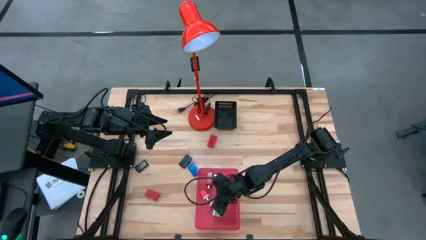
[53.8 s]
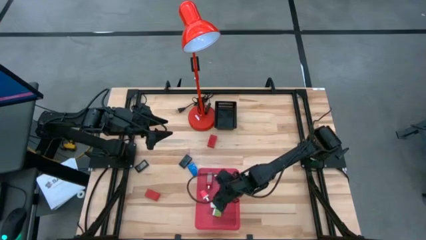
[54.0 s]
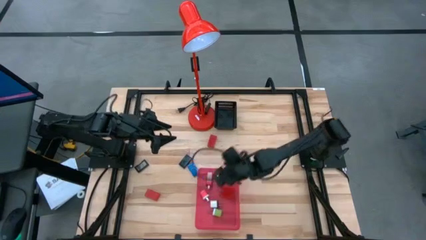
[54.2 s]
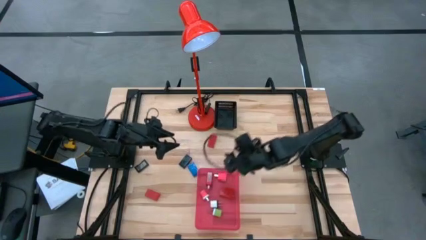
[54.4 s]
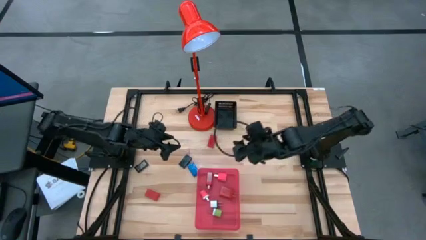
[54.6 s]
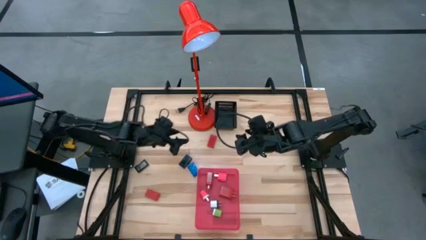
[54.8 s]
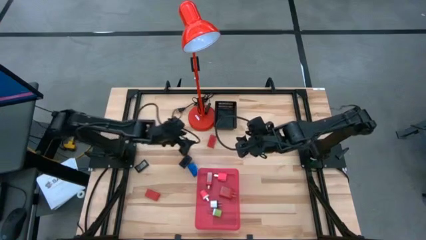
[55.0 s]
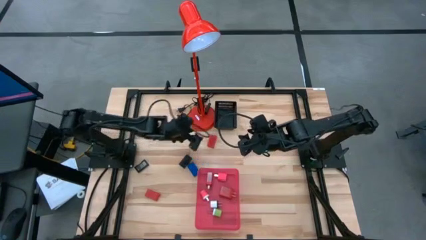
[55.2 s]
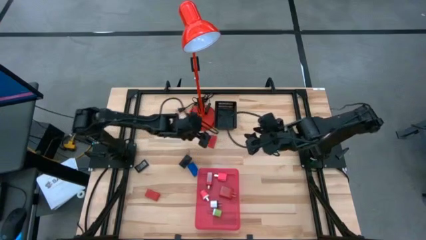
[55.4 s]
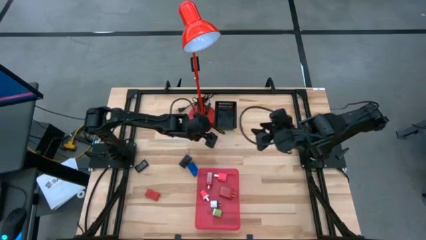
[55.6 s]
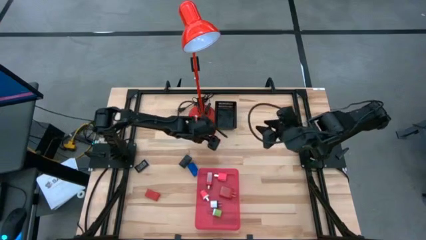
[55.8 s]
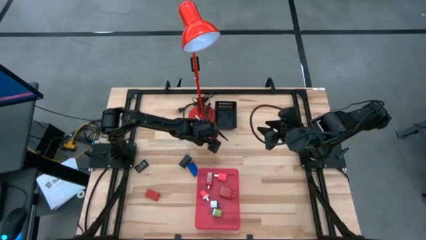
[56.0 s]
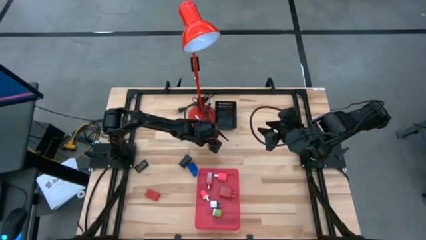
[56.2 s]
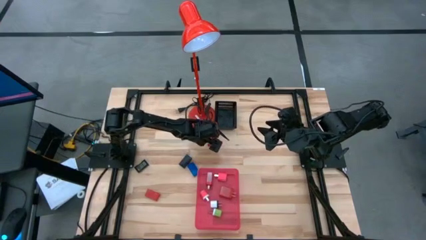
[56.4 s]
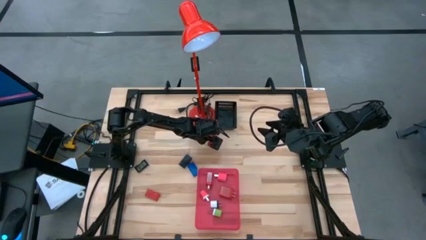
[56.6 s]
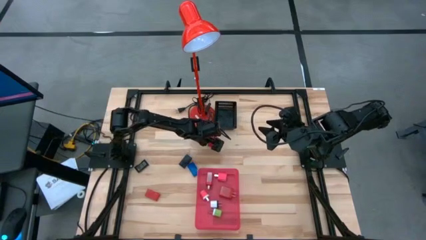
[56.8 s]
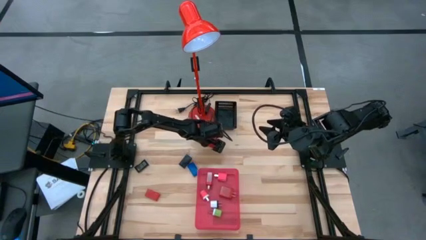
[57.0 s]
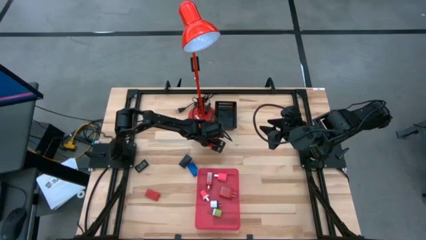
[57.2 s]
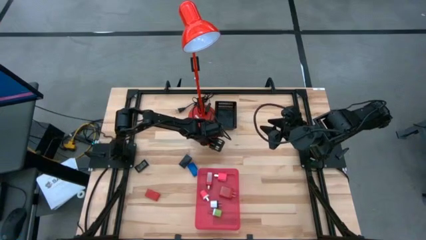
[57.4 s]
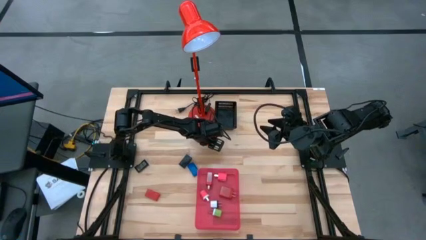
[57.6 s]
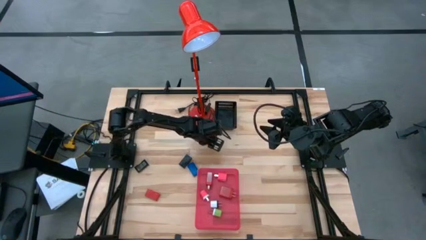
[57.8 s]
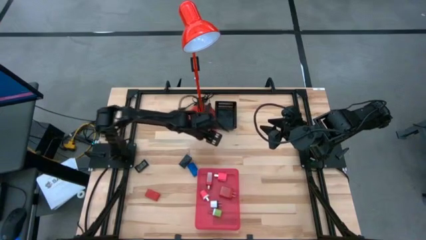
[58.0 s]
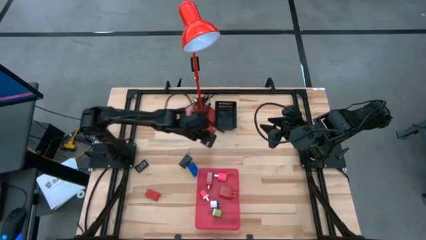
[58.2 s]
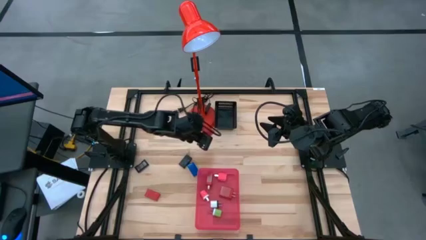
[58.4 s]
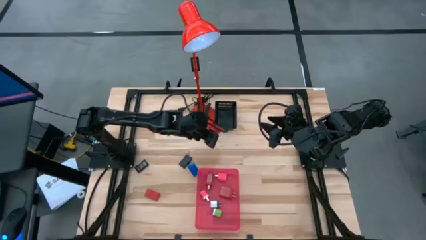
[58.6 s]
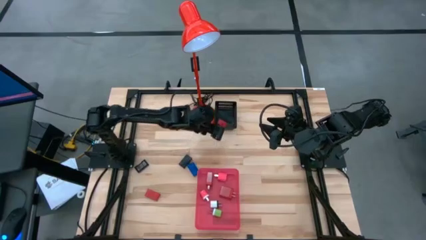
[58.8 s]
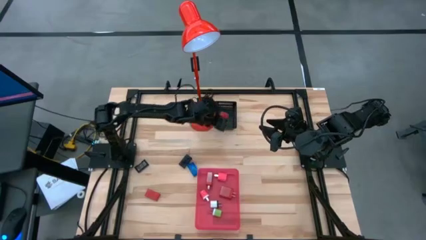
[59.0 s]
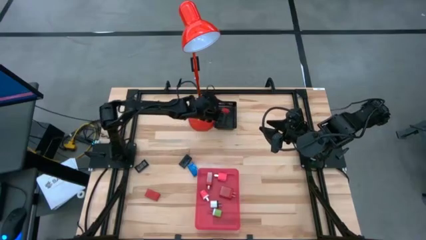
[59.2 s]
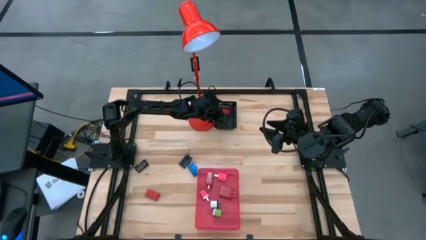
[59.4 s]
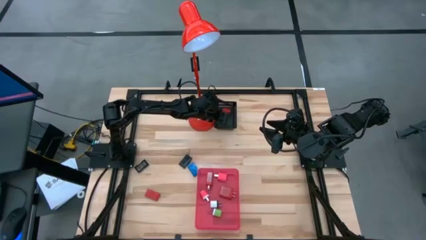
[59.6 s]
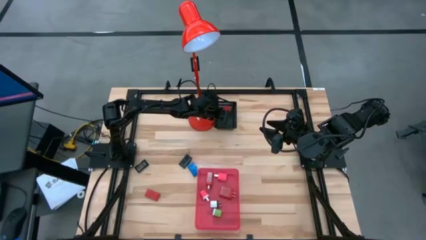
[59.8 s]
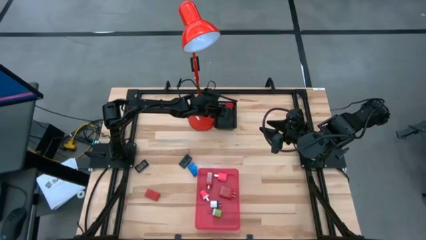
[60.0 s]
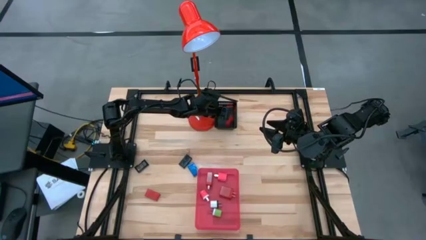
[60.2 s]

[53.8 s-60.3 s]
Task: Pick & Place Office items
Put the top red digital clock into the black bin

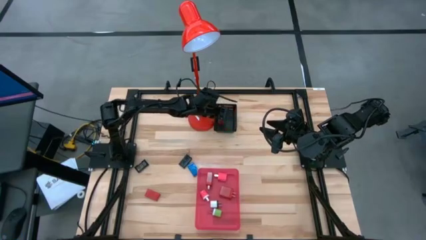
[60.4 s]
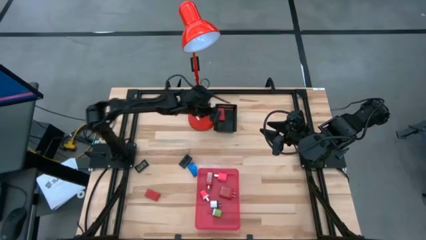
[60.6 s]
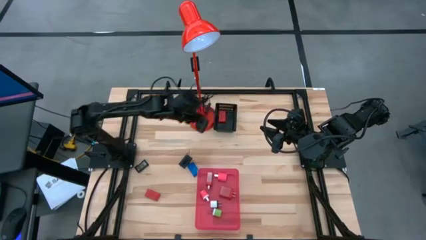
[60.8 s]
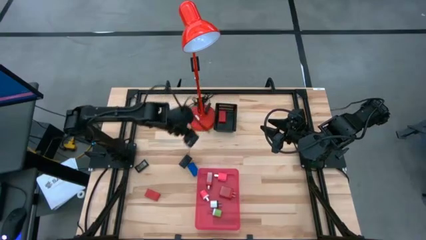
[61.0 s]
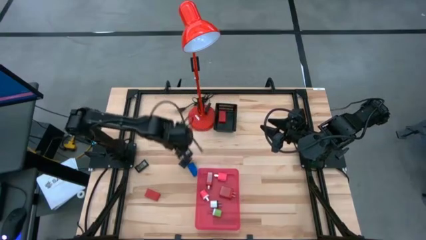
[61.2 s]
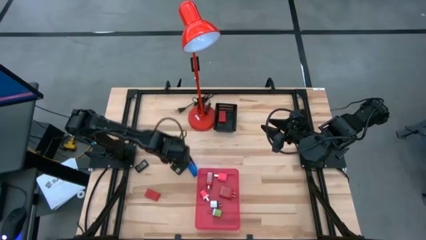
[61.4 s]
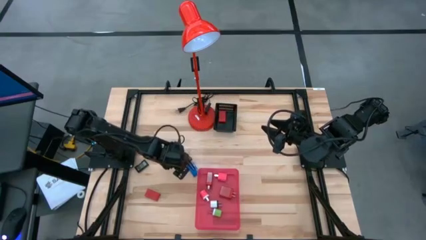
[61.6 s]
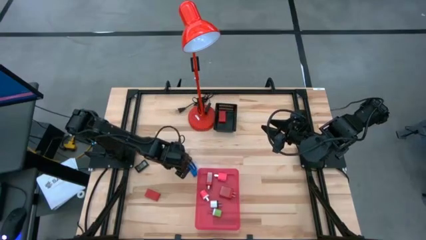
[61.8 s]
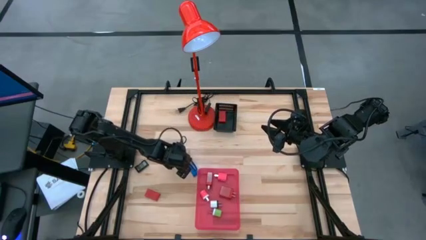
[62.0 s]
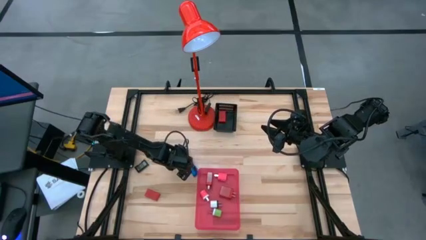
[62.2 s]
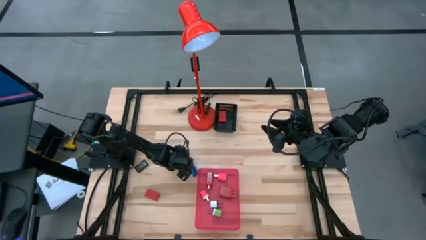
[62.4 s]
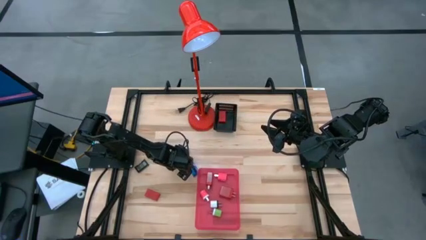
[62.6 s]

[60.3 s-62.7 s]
Put the right black digital clock into the black bin

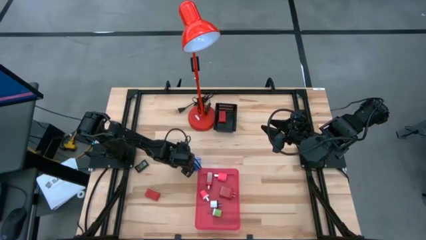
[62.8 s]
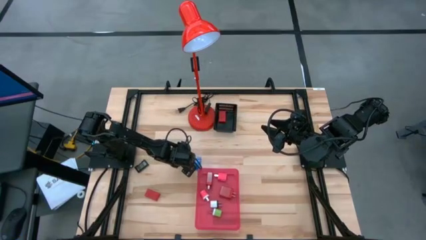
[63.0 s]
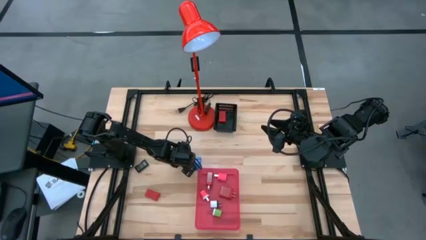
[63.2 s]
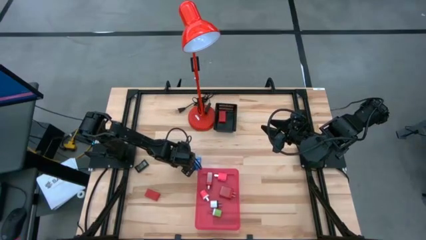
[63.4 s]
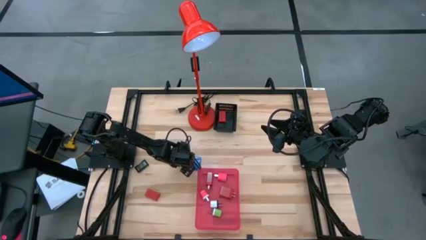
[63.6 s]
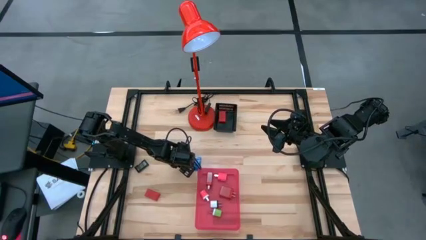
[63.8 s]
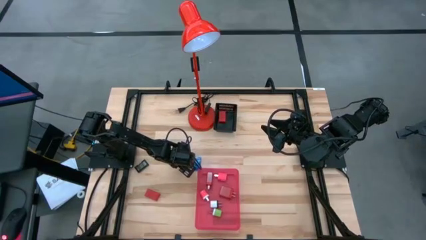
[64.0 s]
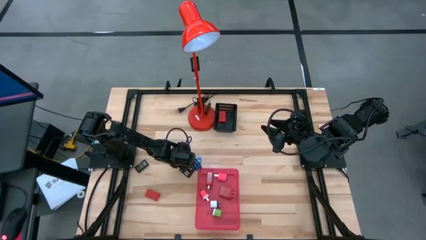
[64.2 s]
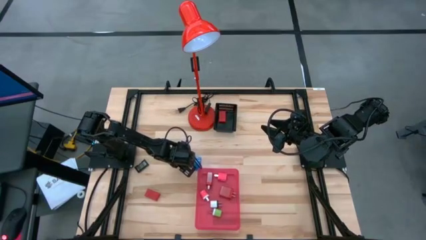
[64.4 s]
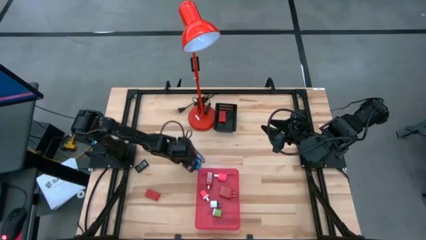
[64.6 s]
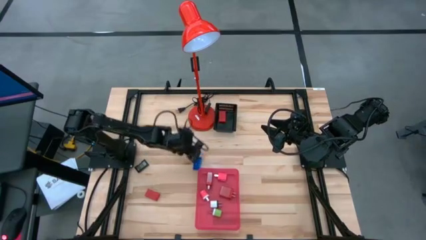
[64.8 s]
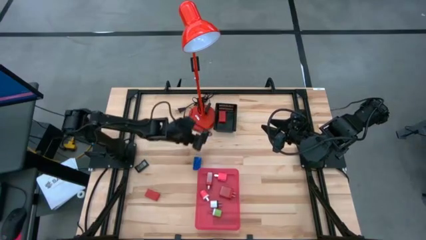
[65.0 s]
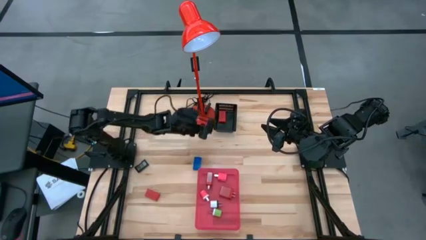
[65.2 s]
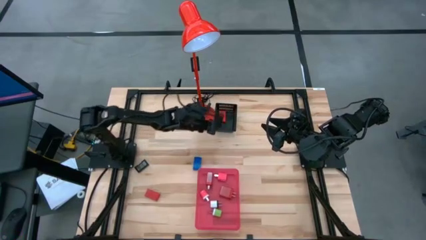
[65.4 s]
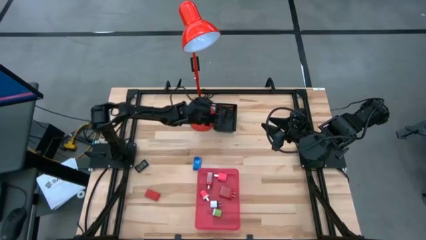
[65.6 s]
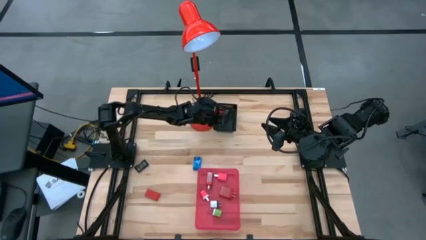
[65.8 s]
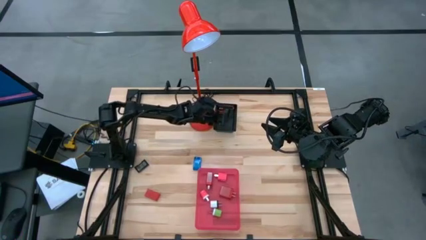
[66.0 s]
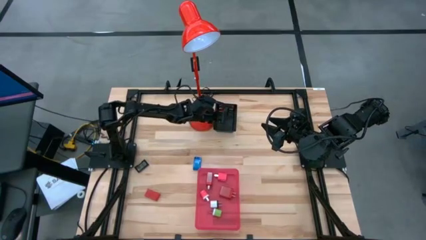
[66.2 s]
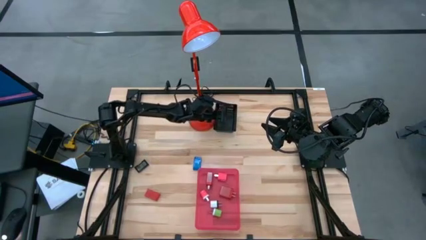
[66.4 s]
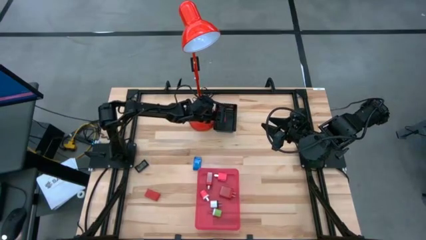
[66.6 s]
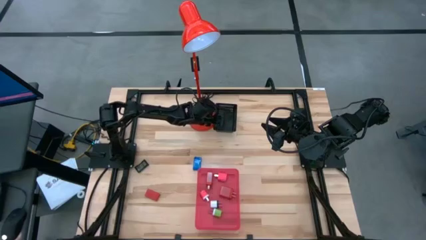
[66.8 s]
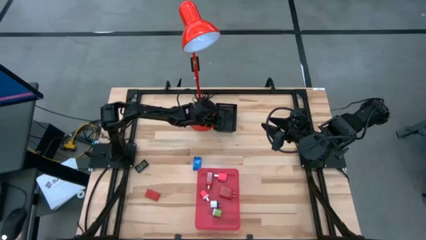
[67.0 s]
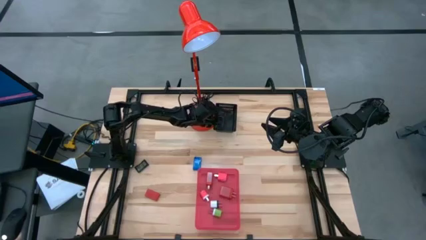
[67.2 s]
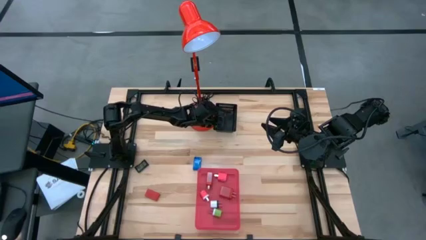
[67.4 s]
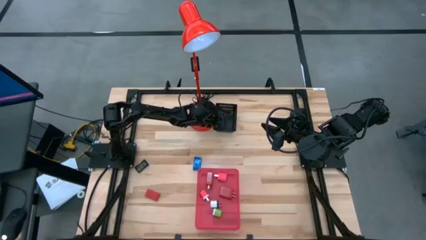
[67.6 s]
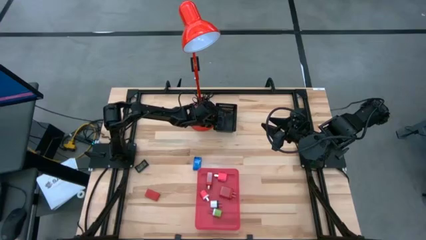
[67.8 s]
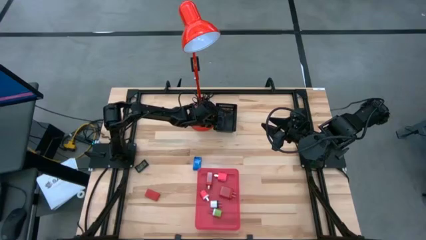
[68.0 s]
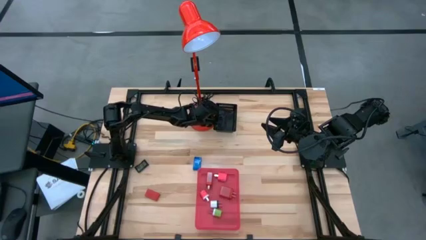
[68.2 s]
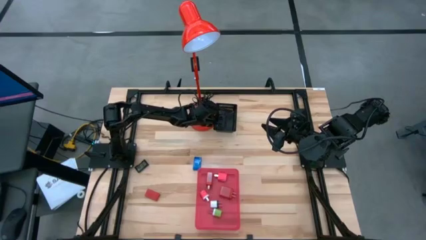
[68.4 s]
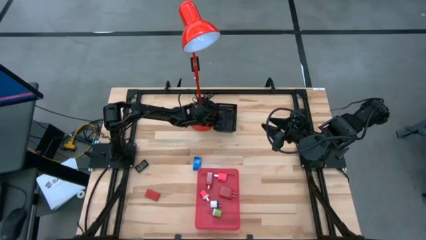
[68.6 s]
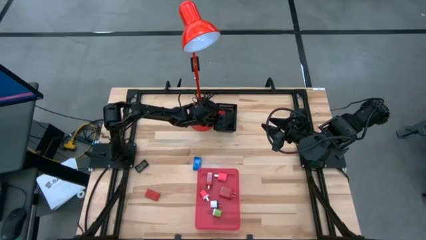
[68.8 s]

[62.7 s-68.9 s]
Put the right black digital clock into the black bin
